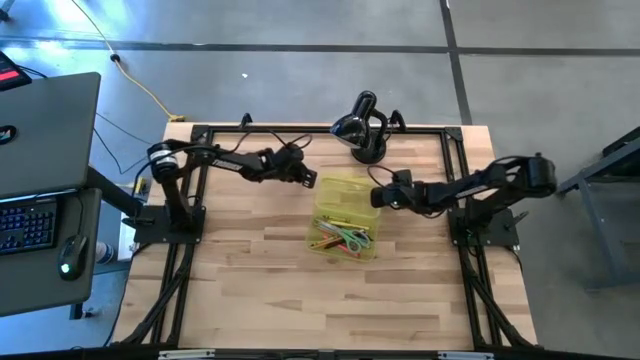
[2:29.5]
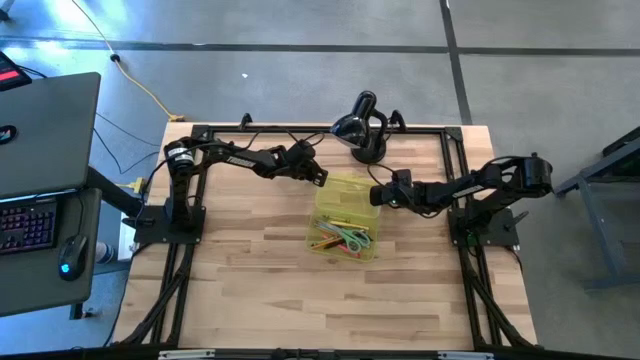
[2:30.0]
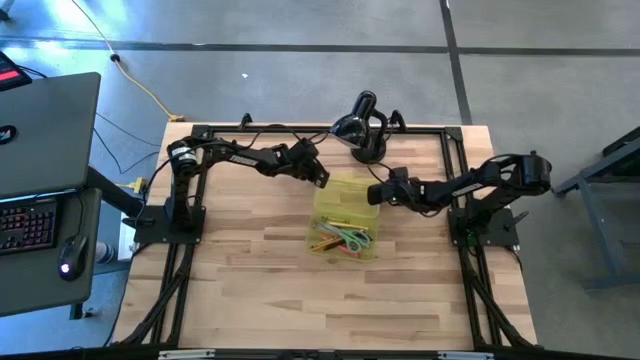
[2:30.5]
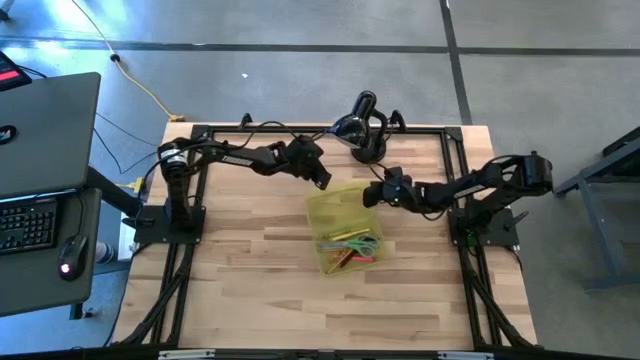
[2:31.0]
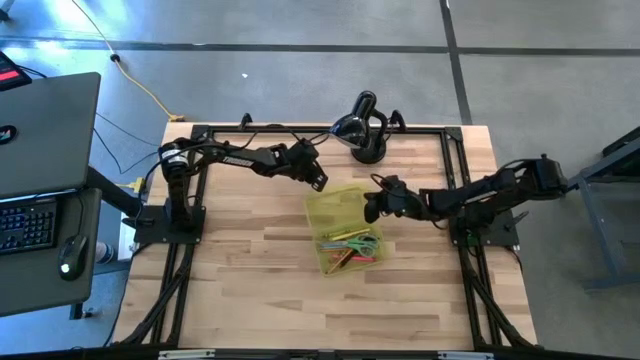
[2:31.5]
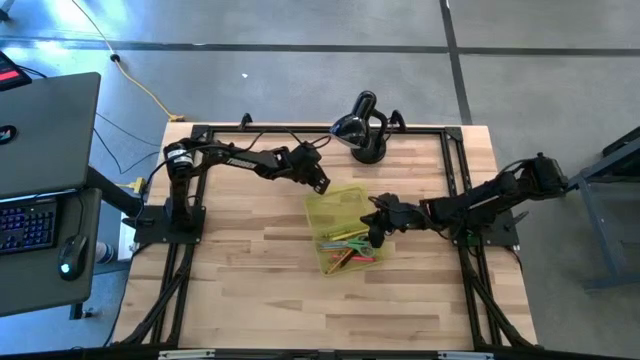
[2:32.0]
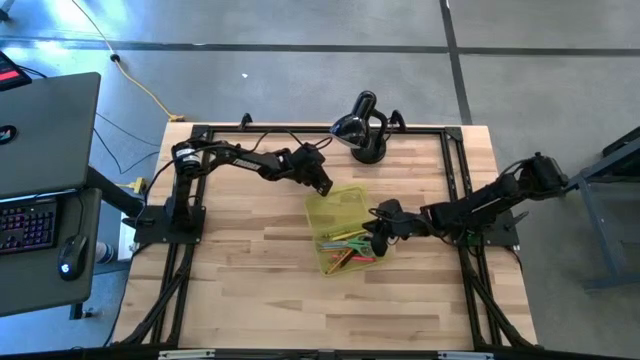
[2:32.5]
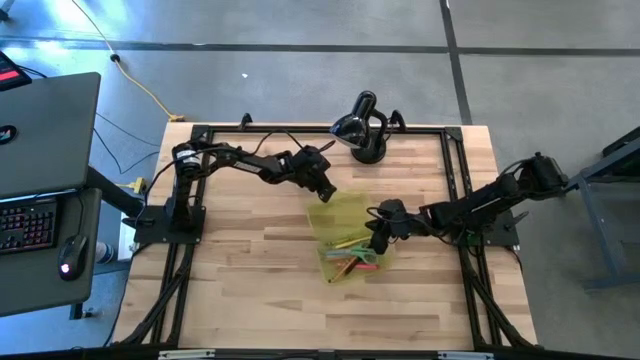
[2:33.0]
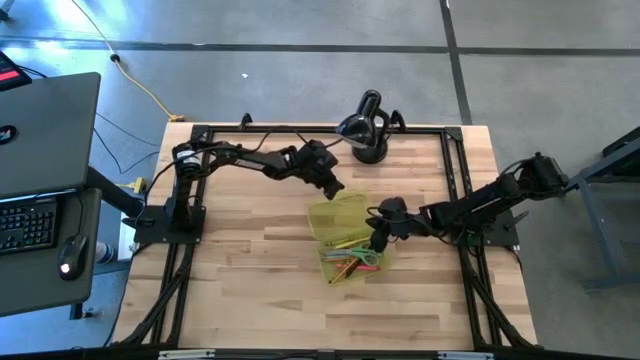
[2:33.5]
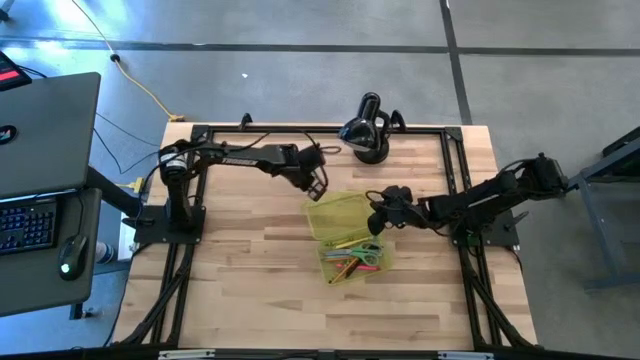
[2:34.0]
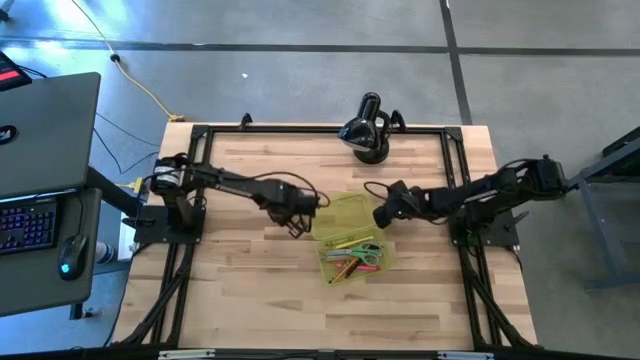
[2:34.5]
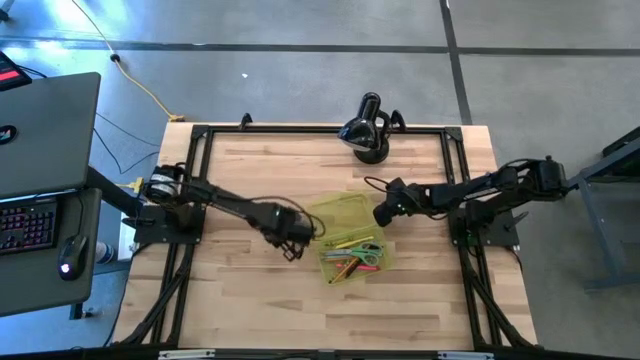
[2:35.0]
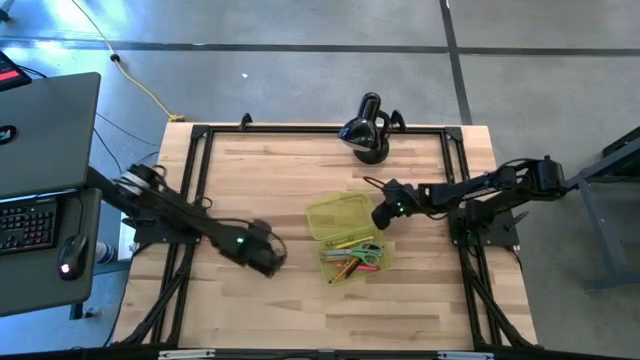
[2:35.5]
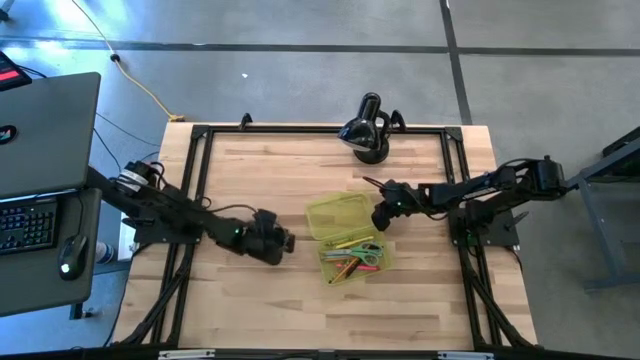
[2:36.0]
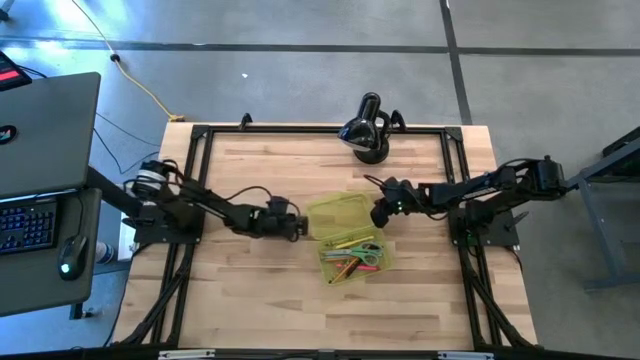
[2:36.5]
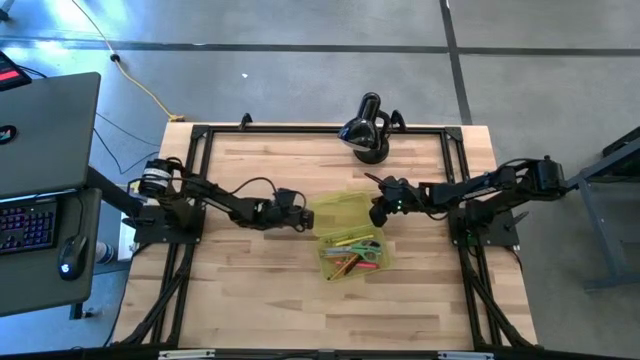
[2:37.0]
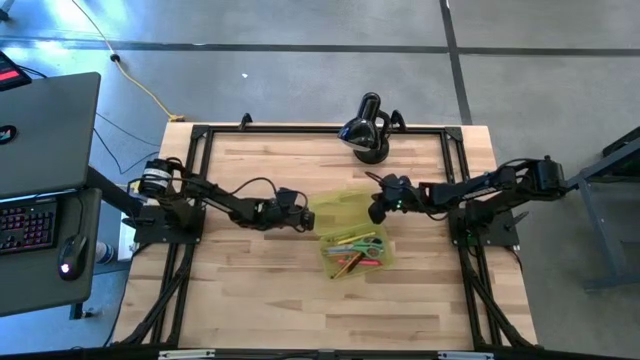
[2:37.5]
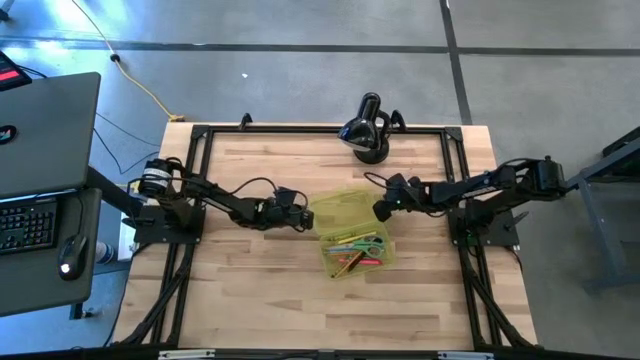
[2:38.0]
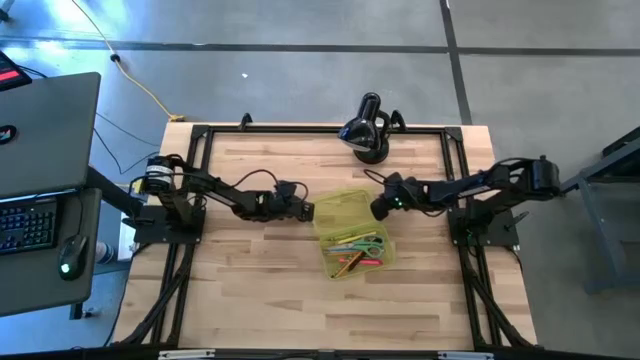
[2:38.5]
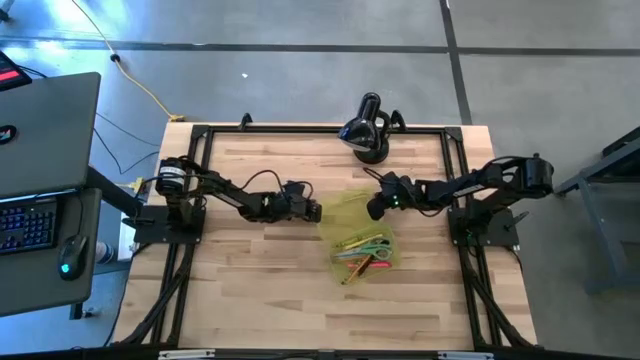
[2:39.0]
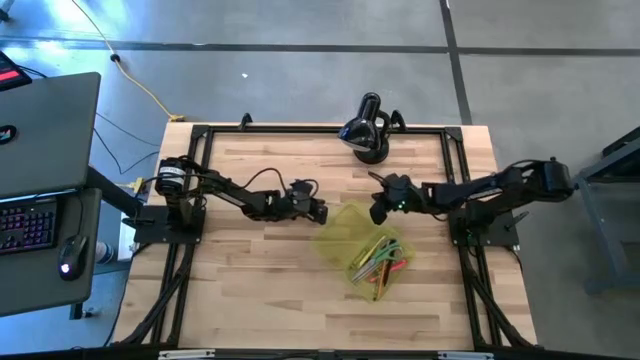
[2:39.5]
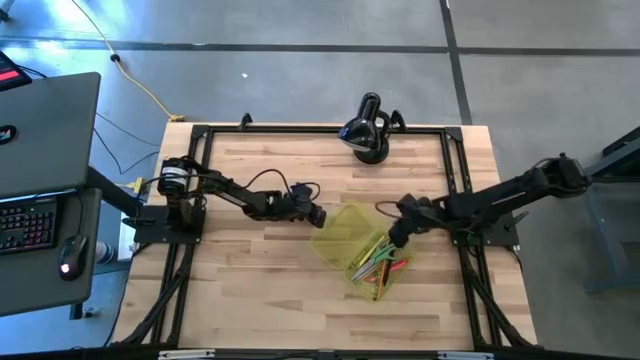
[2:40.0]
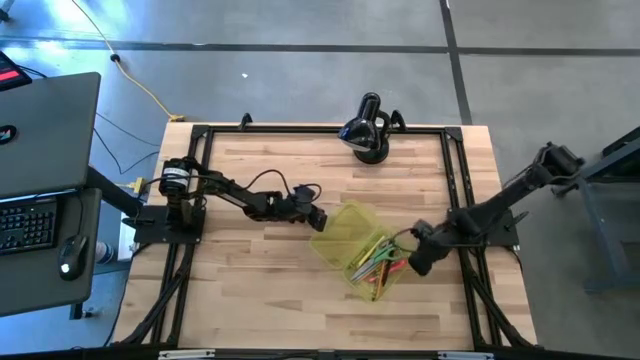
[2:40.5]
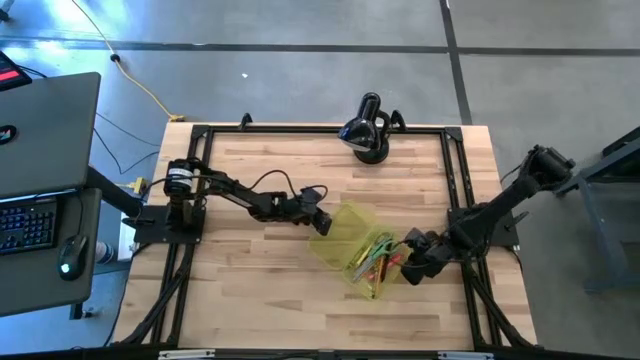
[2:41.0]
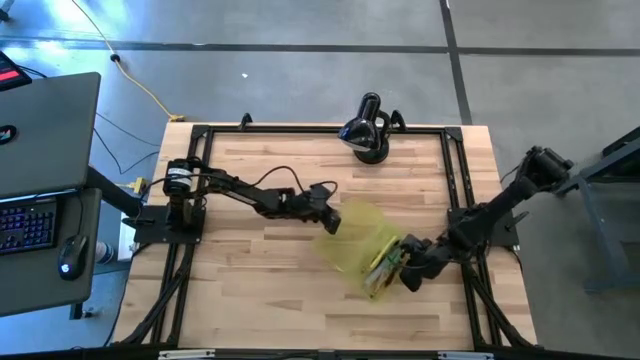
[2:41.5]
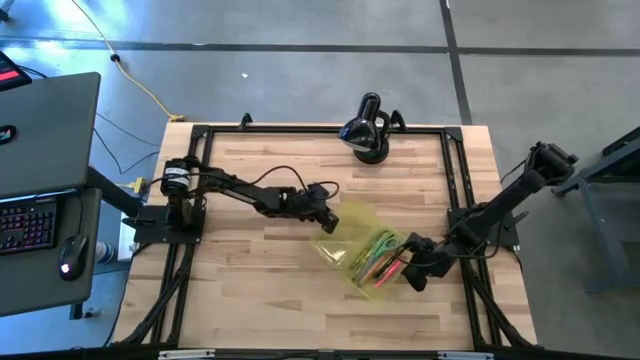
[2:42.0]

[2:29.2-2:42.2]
Task: Pick & place school supplies into a supply box
Close the yellow school supply box

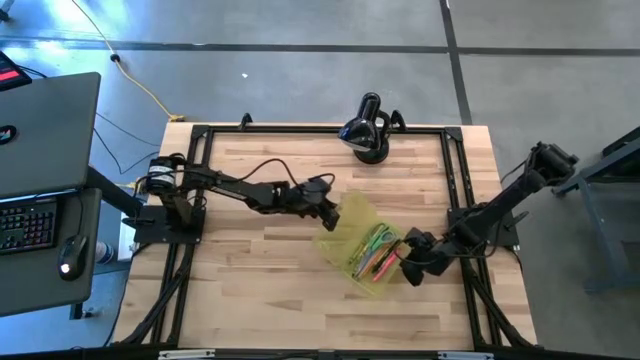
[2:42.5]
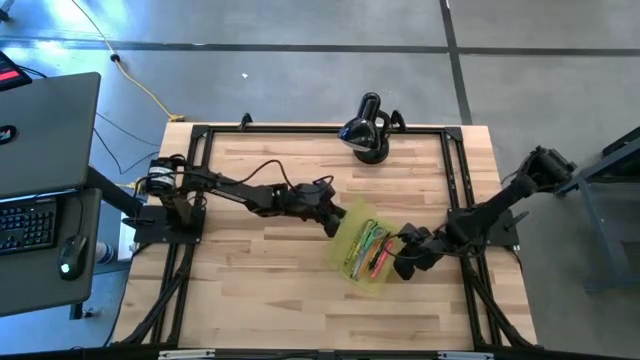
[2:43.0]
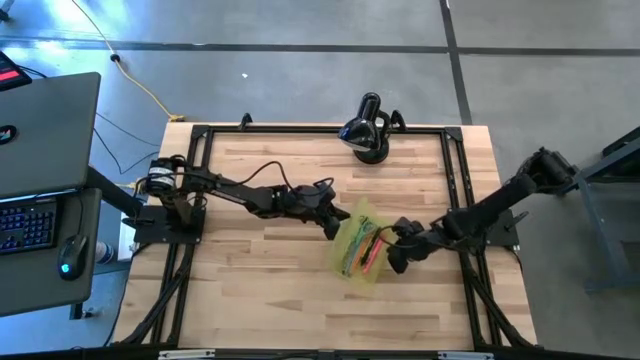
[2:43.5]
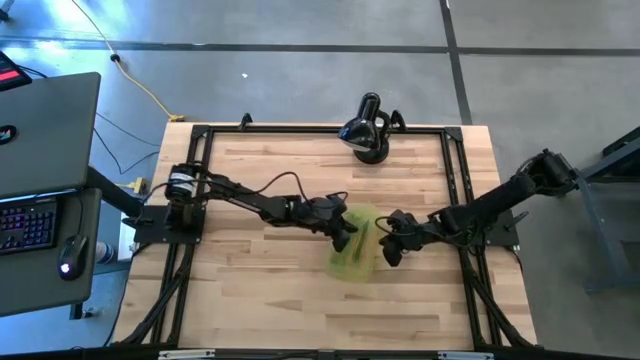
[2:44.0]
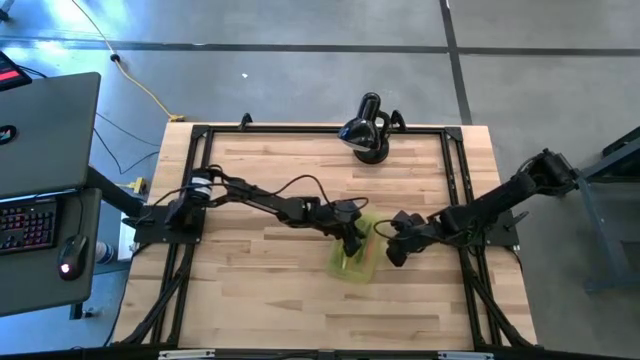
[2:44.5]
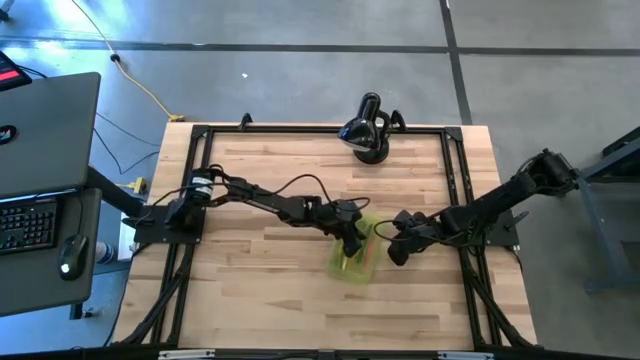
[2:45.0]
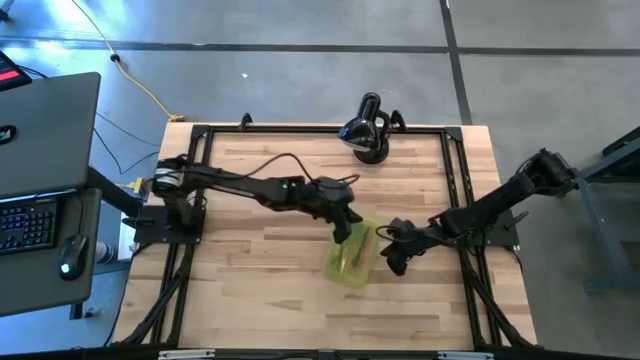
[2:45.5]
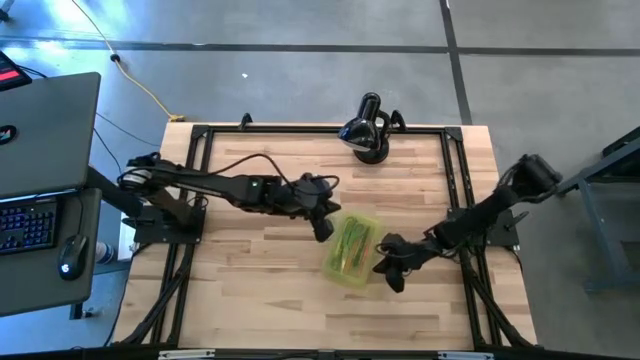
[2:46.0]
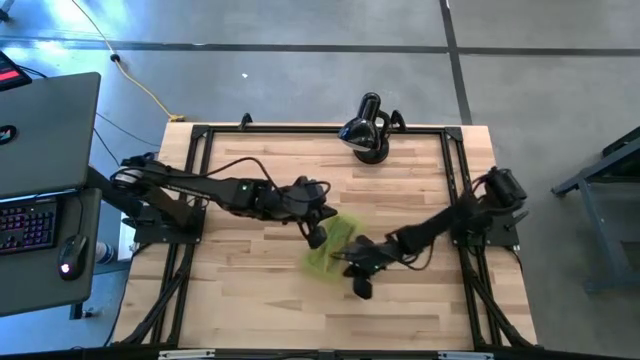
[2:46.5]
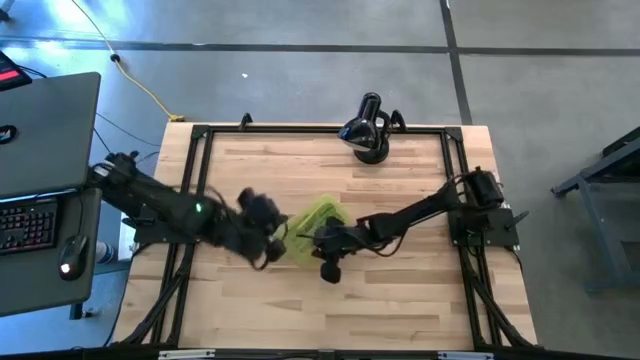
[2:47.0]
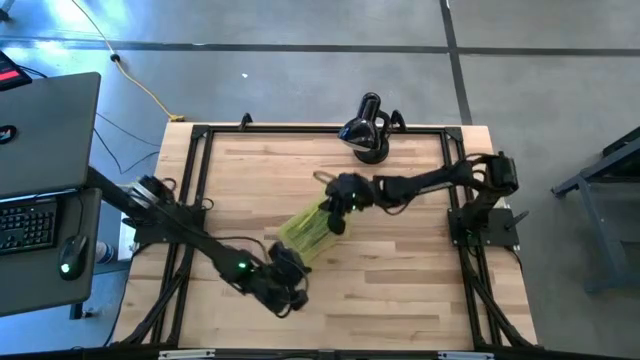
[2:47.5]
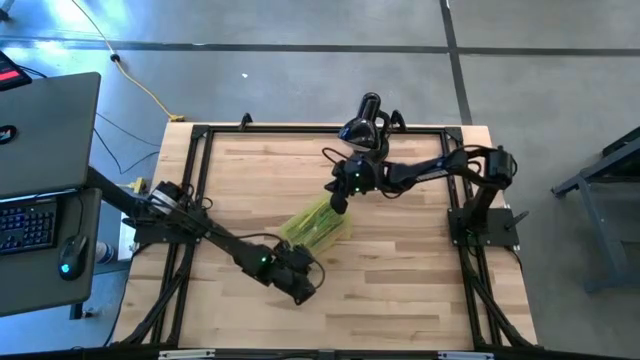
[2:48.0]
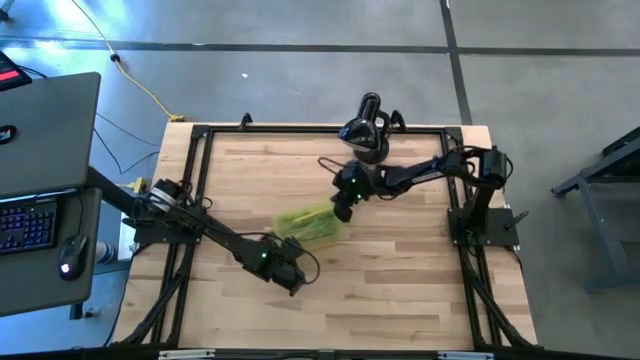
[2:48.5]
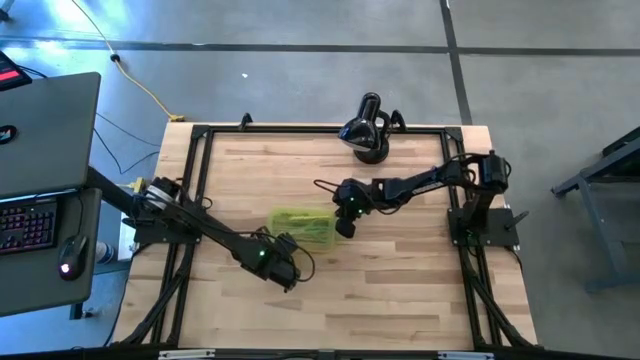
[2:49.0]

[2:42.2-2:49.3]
Close the yellow school supply box
